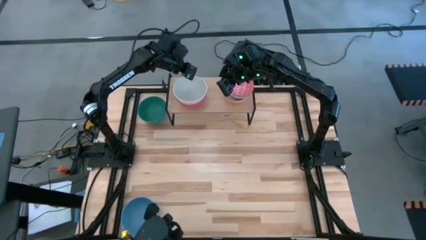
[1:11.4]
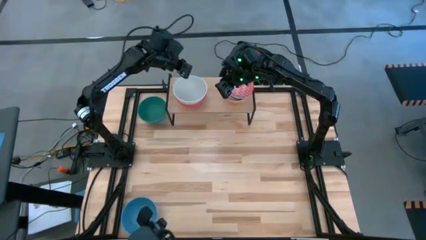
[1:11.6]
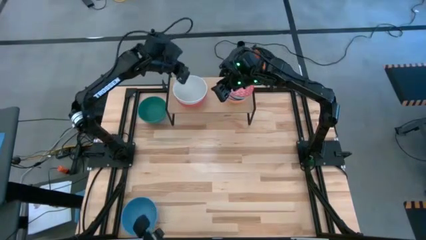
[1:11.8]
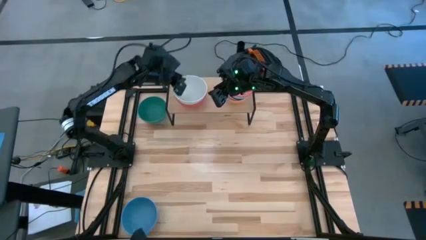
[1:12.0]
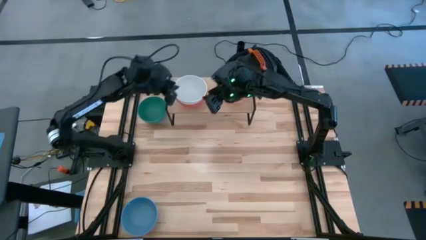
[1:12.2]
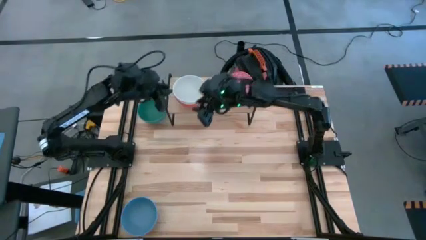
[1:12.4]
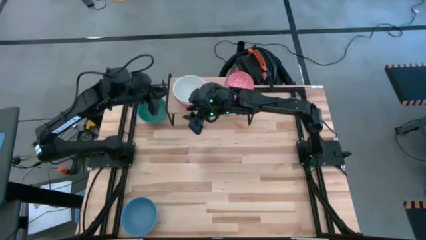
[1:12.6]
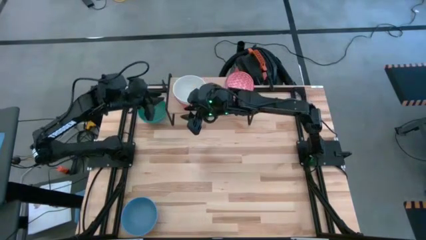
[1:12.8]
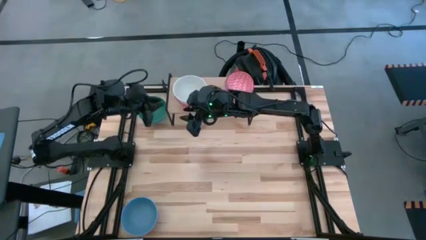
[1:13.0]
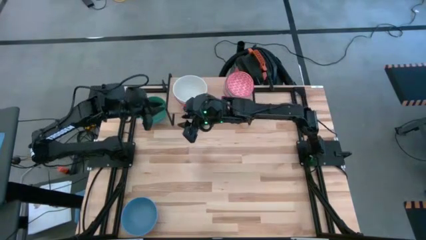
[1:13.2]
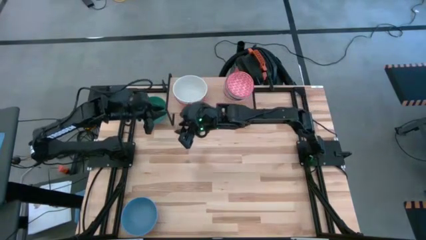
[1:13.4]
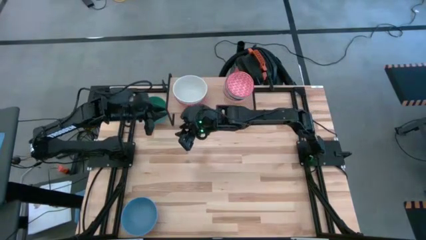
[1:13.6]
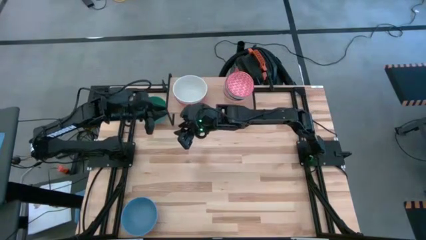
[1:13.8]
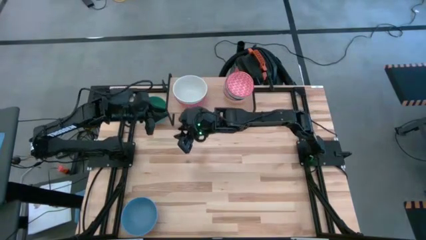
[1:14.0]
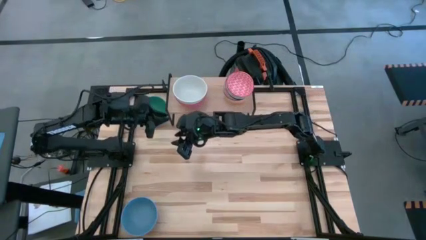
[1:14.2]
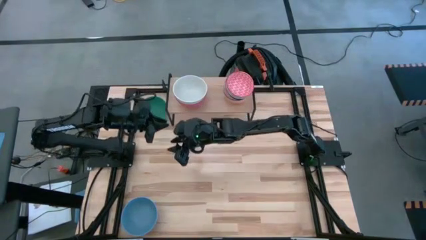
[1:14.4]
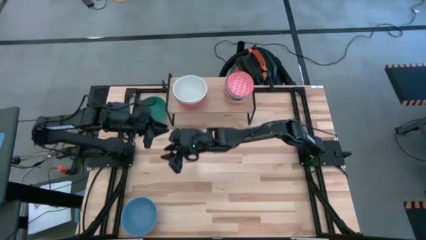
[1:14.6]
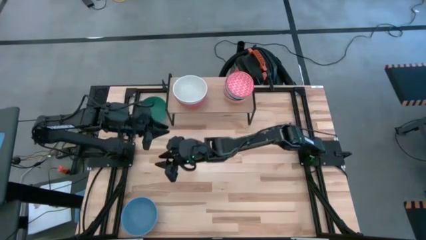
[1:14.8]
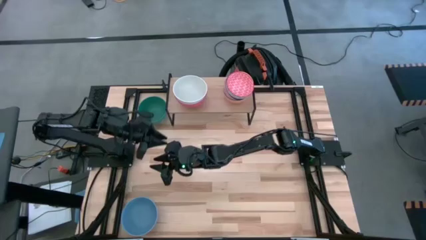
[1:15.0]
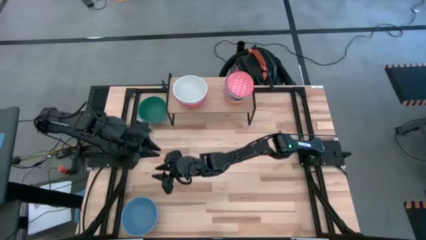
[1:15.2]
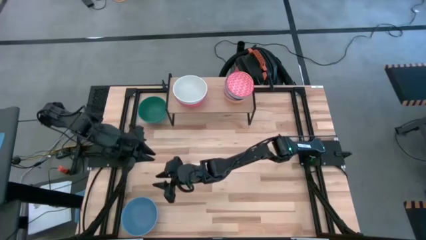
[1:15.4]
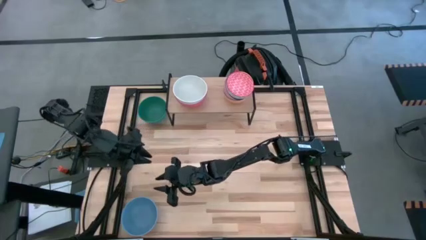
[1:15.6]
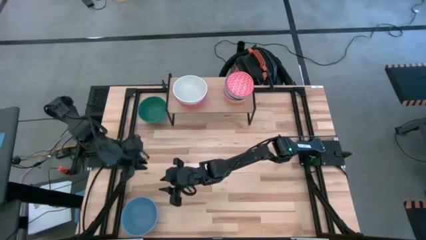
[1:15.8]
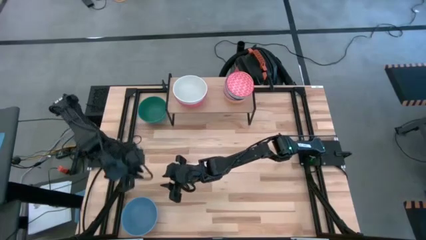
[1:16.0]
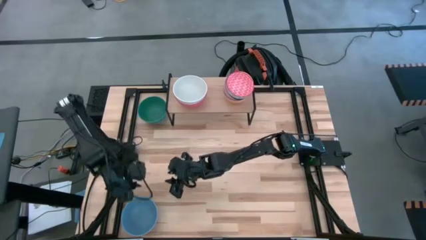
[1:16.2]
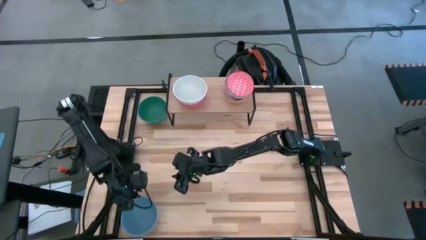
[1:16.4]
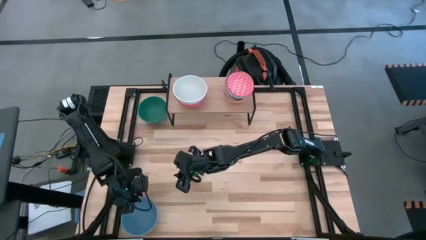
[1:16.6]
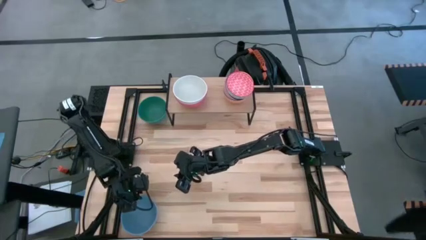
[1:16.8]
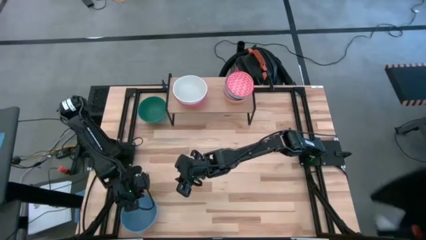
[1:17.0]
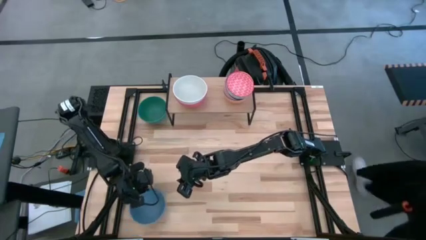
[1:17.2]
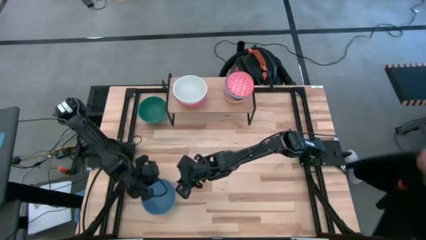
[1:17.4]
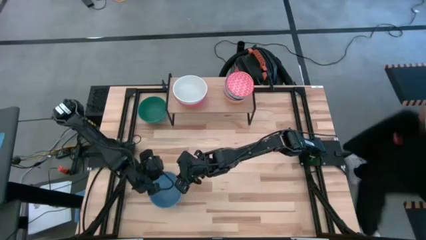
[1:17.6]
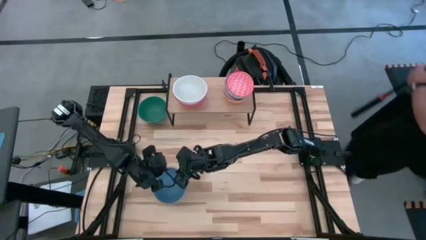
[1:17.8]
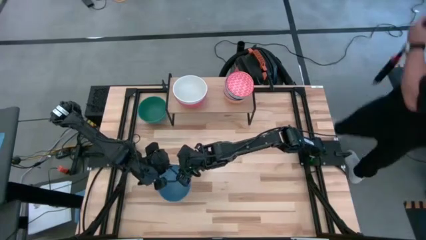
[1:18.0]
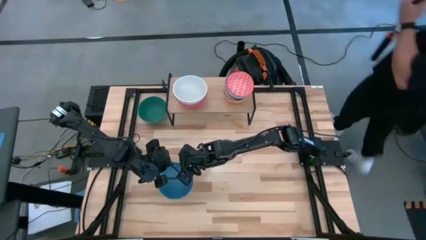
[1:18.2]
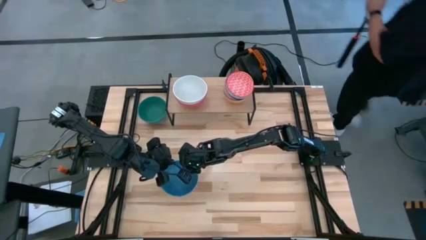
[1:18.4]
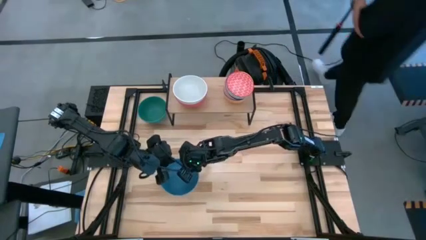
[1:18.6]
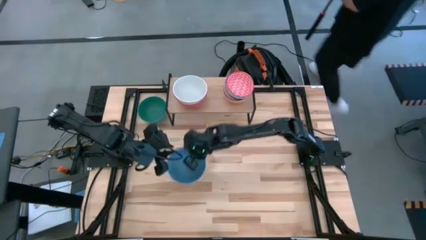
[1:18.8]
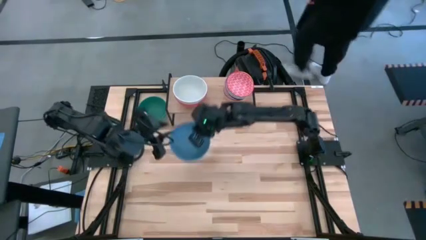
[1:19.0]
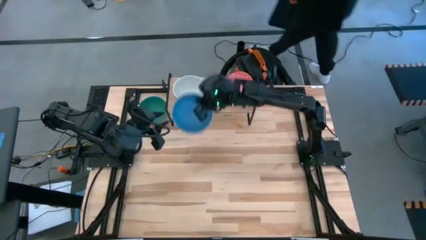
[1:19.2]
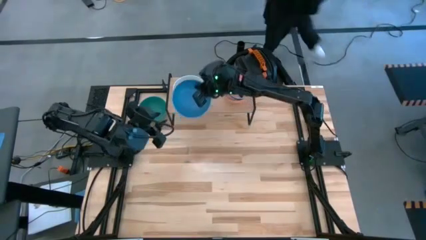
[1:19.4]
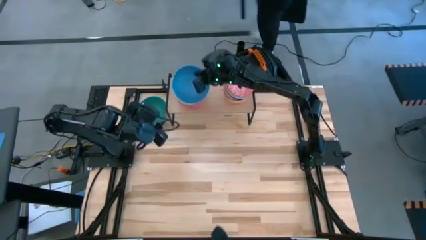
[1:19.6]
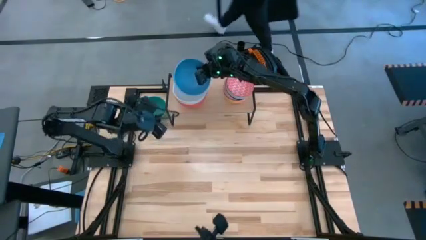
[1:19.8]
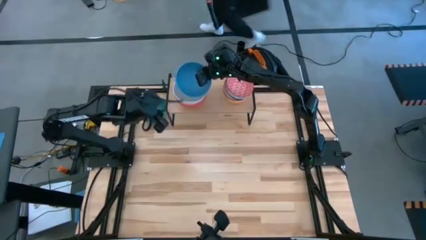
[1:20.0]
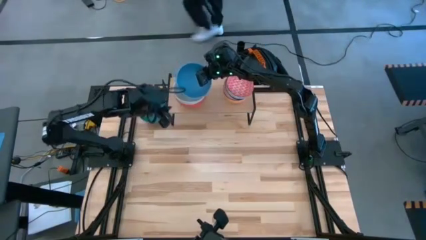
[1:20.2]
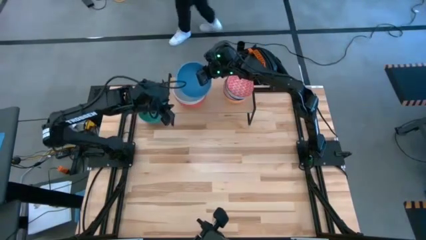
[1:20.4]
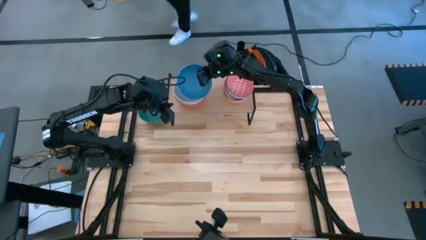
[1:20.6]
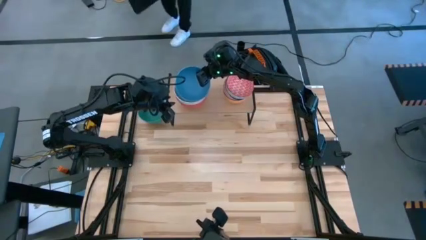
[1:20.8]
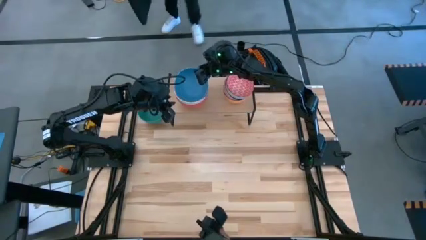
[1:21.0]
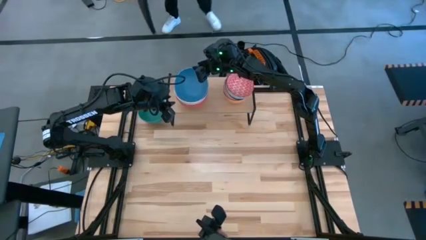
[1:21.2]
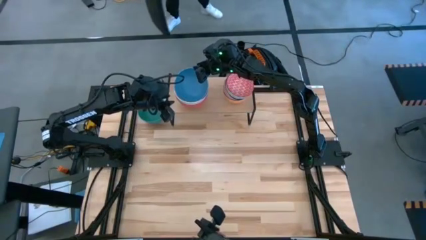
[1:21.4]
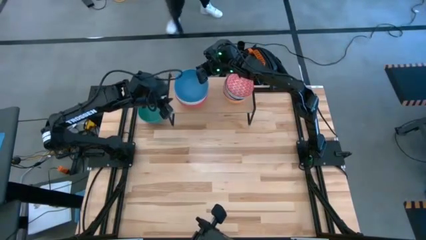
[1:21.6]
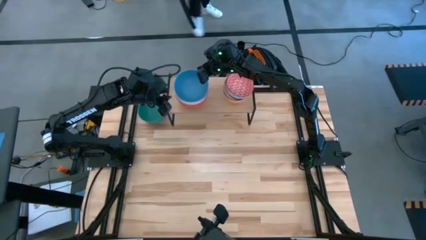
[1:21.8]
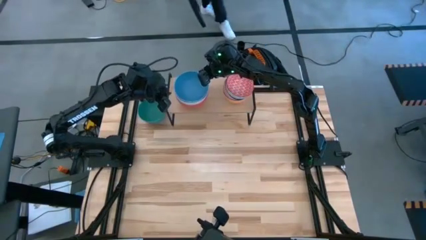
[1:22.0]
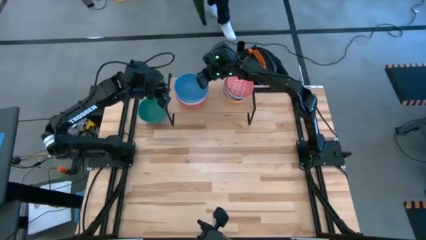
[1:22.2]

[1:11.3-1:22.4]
Task: Place and stack bowls onto a shelf
Stack the blue bowl on top of the white bowl on the shelf

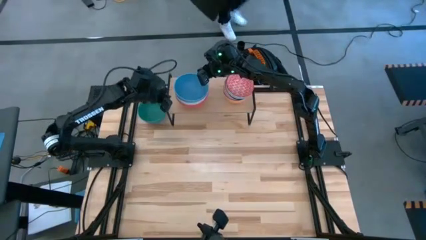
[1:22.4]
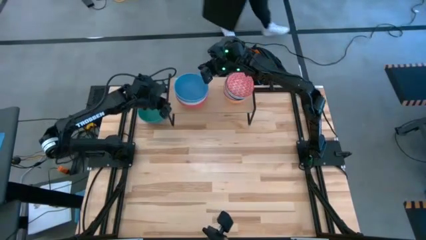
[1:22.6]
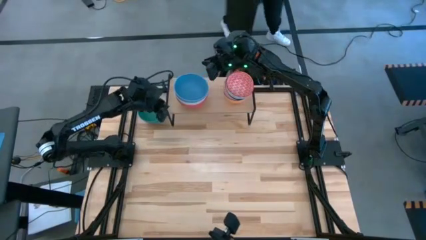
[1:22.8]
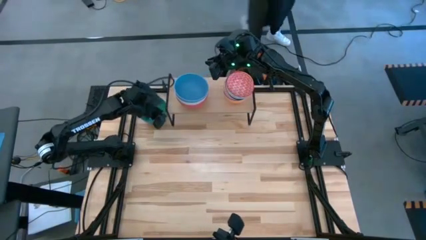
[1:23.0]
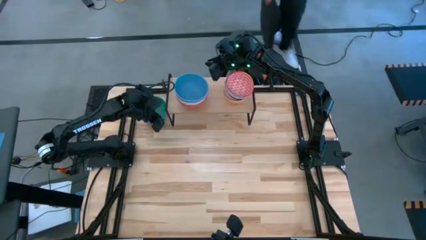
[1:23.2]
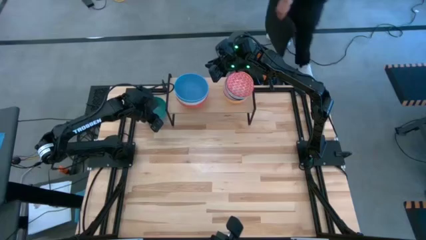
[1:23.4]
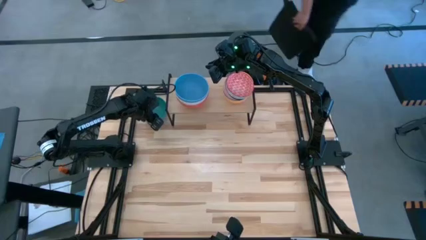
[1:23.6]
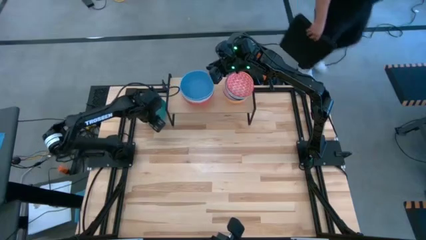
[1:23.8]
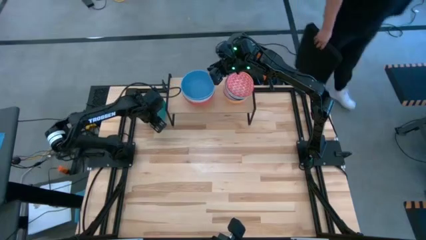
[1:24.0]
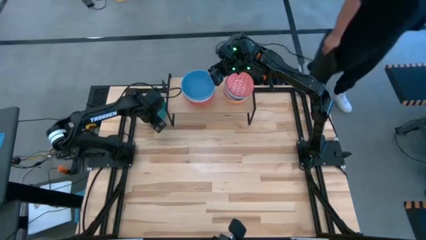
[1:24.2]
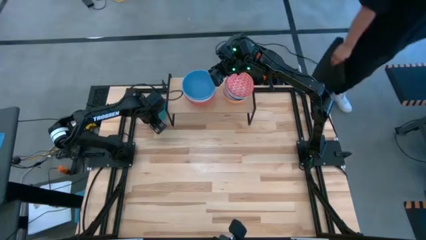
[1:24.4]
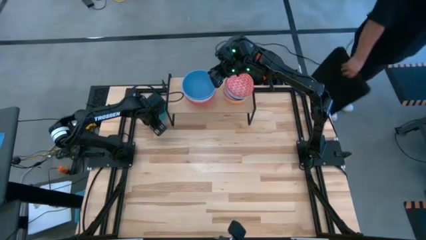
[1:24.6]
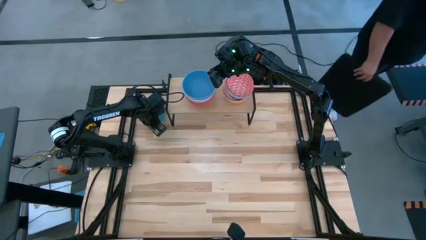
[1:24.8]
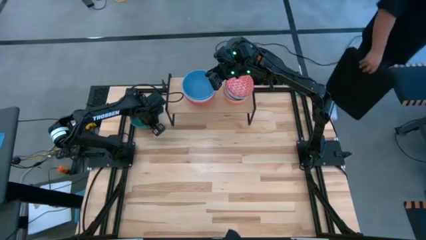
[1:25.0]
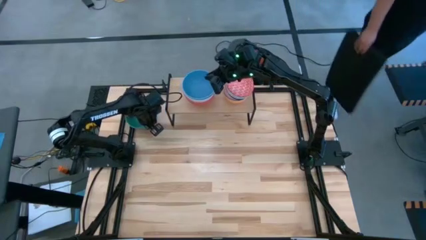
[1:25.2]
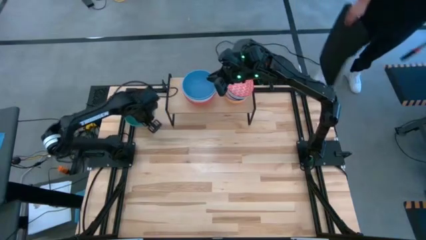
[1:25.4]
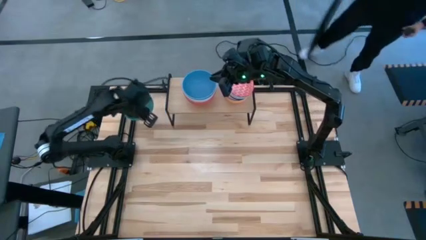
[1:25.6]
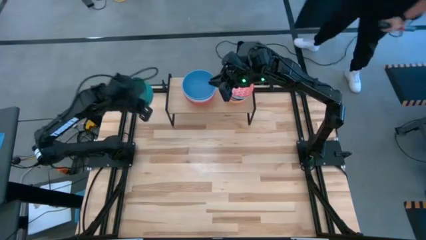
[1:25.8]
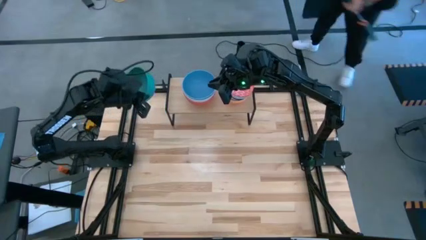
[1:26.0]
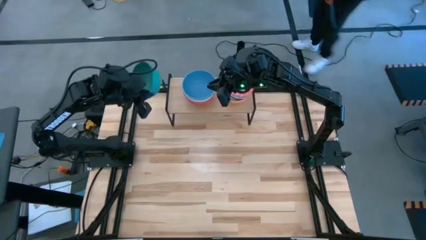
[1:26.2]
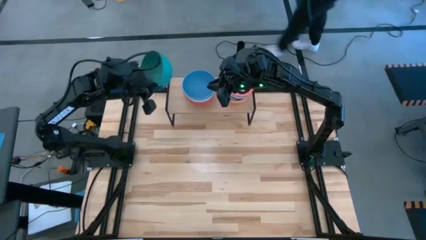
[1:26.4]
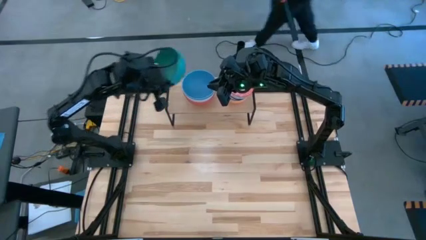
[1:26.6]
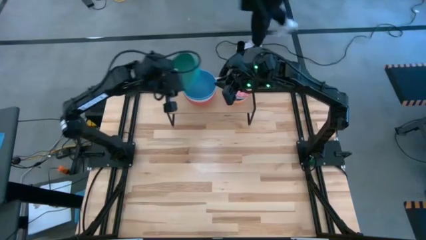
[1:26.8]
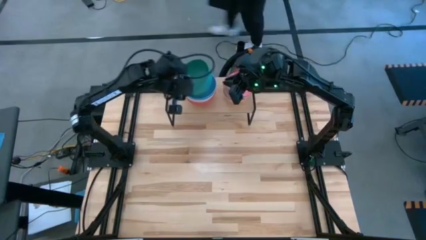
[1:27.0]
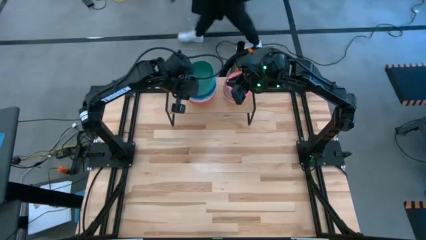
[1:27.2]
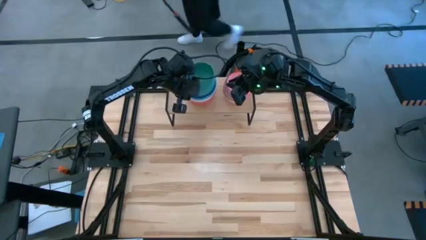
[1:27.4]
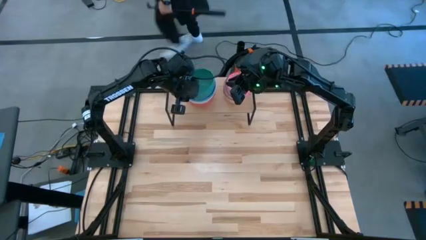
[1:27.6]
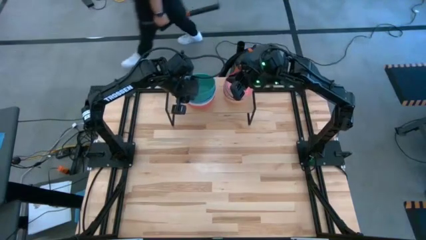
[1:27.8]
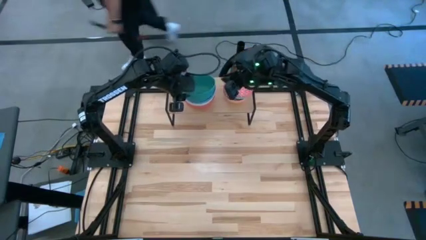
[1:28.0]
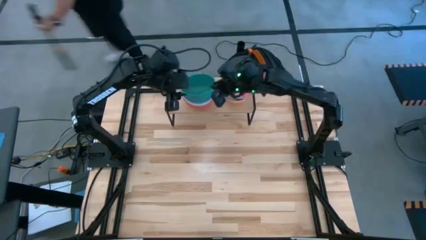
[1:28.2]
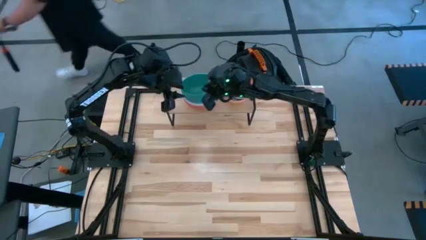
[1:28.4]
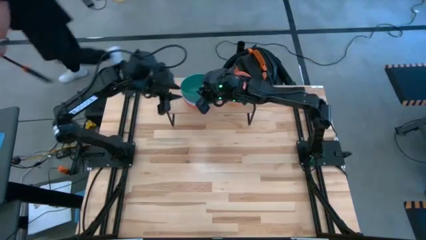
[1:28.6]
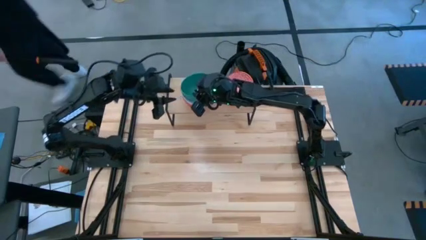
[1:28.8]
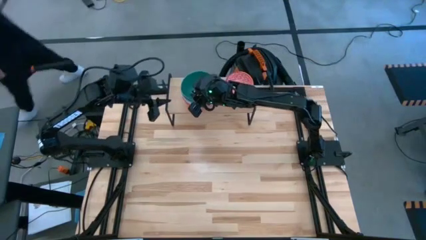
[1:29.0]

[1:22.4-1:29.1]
Stack the green bowl on top of the blue bowl on the shelf
